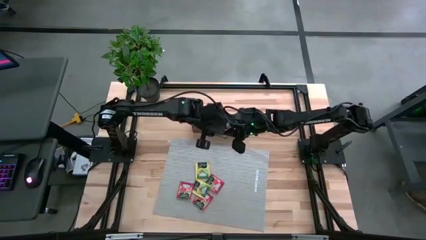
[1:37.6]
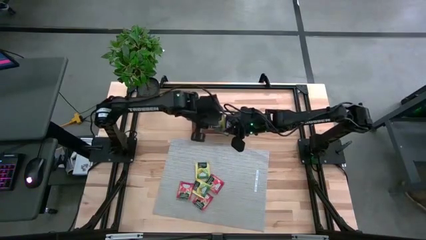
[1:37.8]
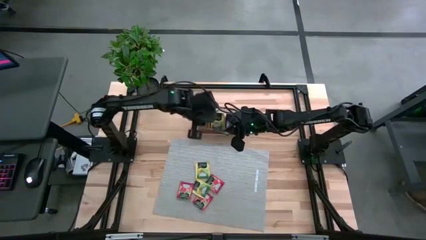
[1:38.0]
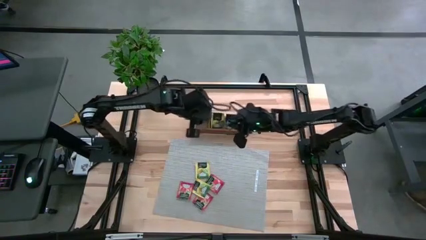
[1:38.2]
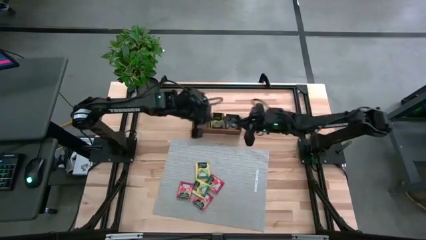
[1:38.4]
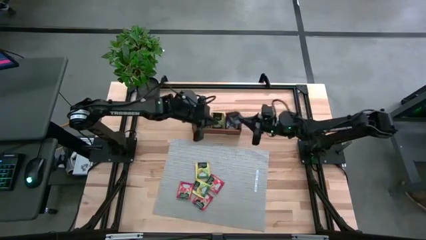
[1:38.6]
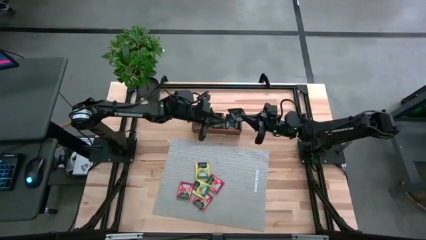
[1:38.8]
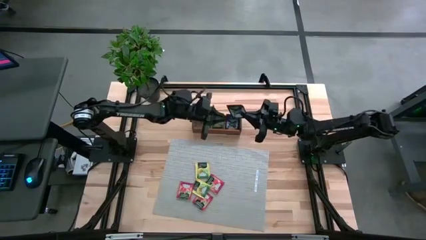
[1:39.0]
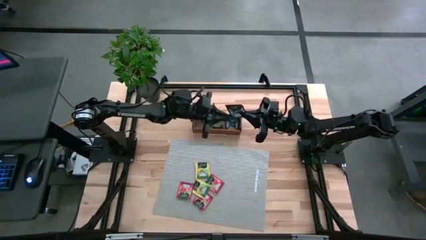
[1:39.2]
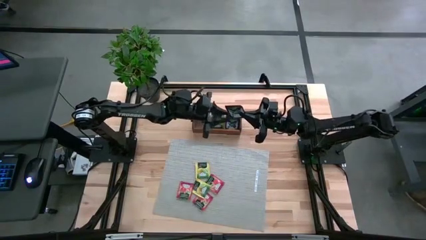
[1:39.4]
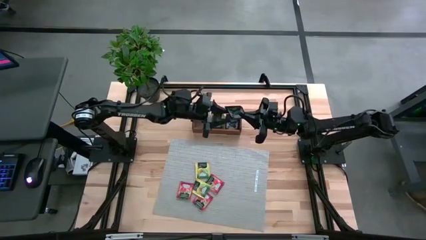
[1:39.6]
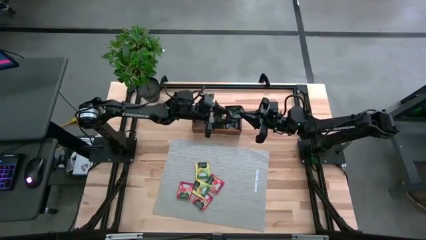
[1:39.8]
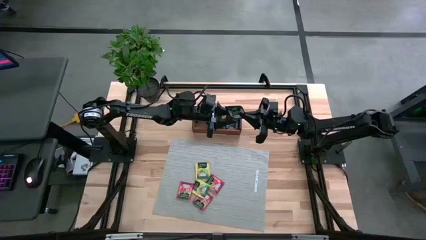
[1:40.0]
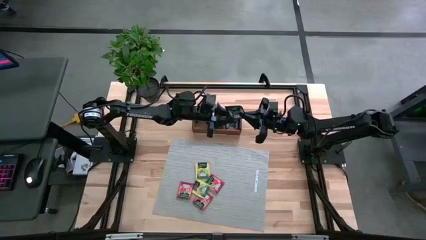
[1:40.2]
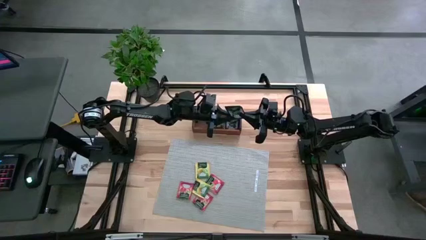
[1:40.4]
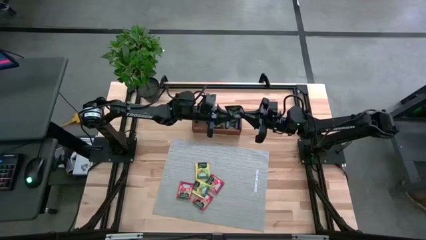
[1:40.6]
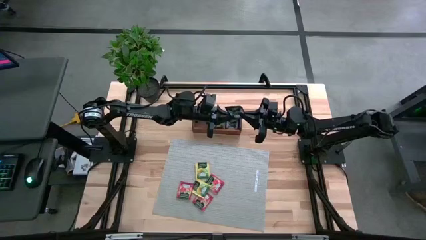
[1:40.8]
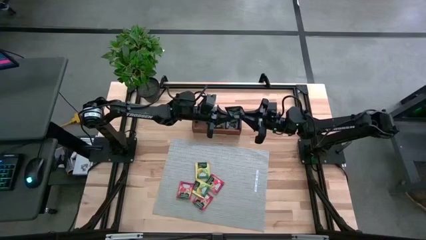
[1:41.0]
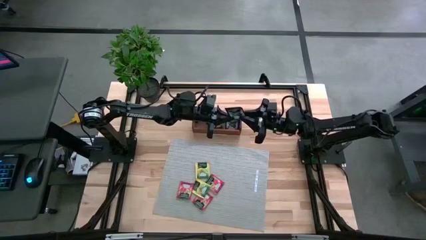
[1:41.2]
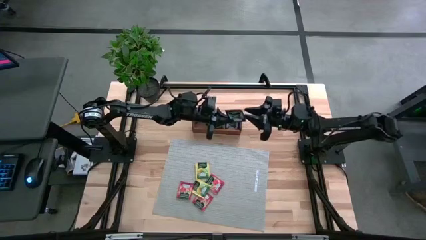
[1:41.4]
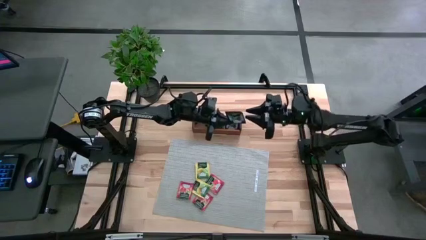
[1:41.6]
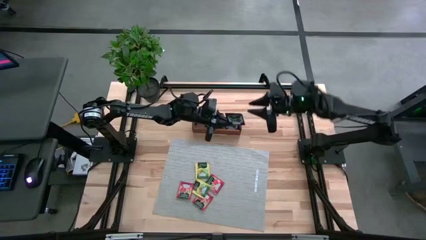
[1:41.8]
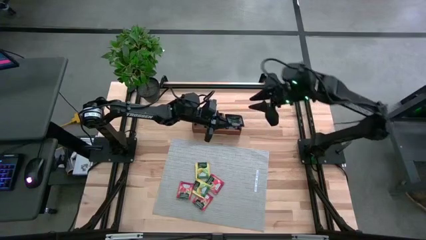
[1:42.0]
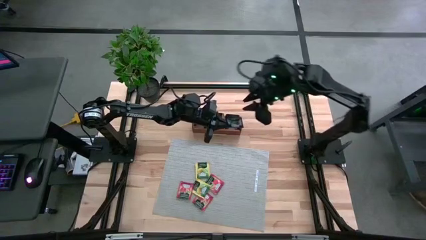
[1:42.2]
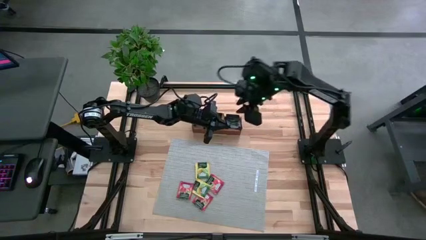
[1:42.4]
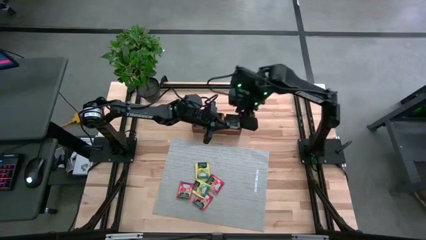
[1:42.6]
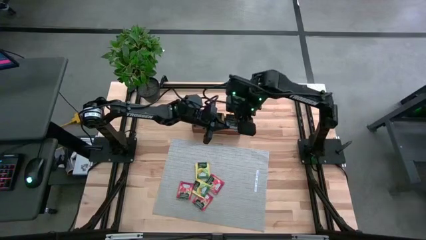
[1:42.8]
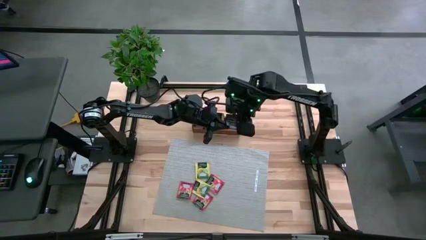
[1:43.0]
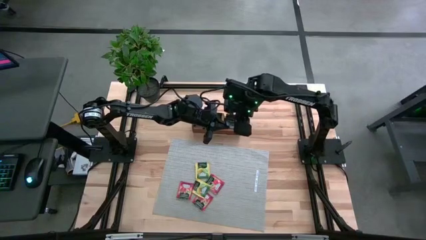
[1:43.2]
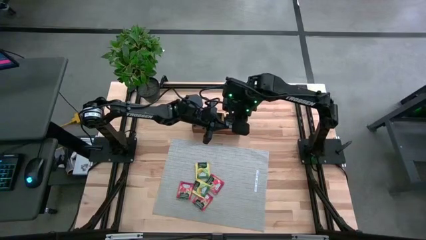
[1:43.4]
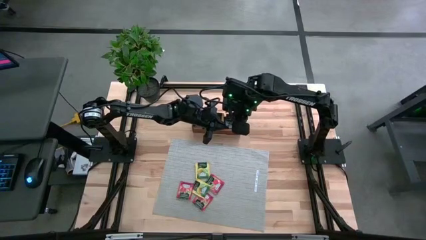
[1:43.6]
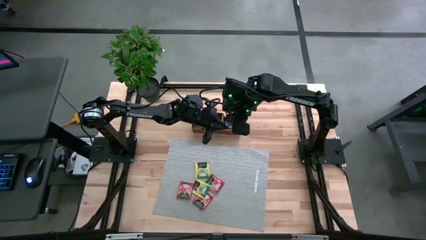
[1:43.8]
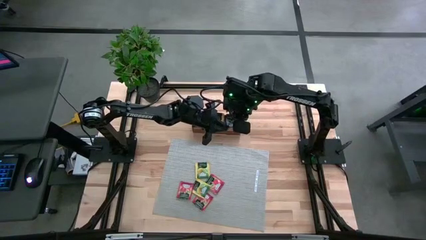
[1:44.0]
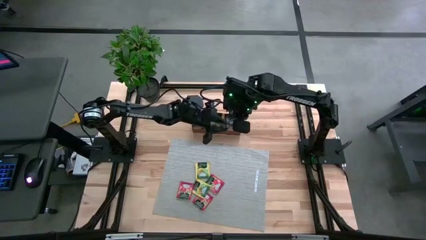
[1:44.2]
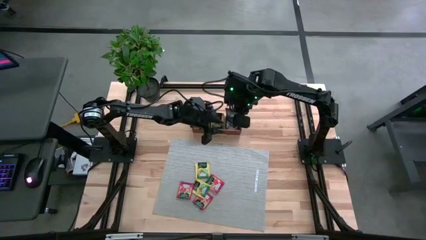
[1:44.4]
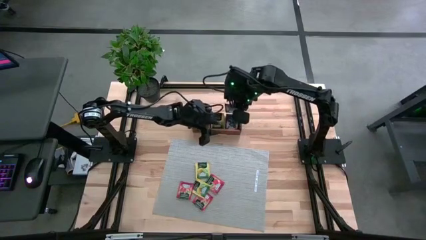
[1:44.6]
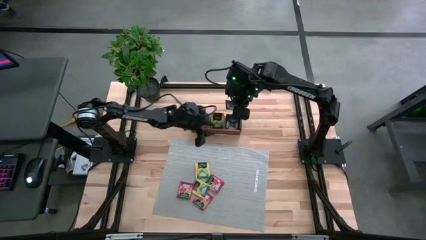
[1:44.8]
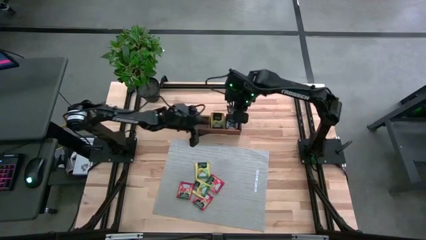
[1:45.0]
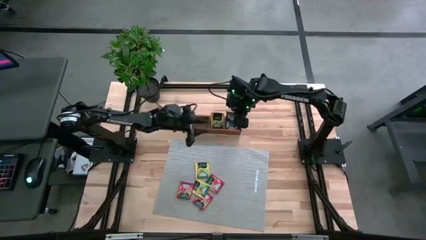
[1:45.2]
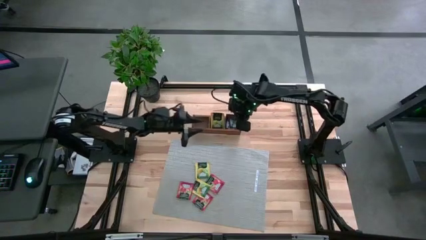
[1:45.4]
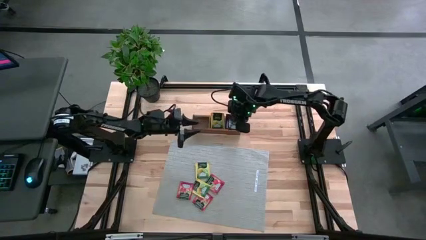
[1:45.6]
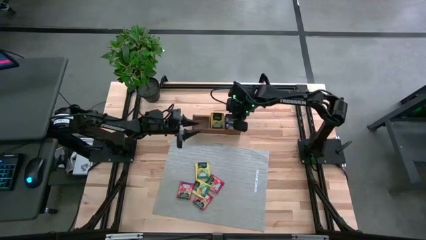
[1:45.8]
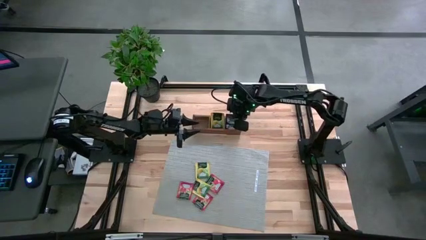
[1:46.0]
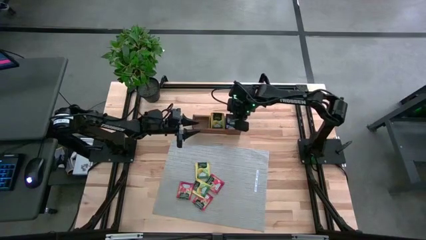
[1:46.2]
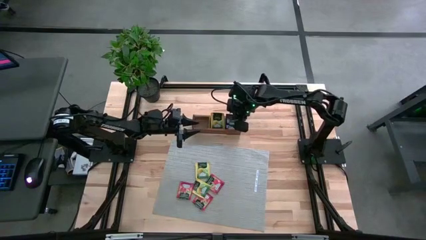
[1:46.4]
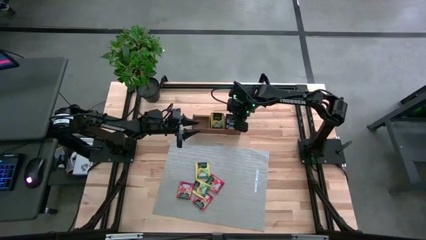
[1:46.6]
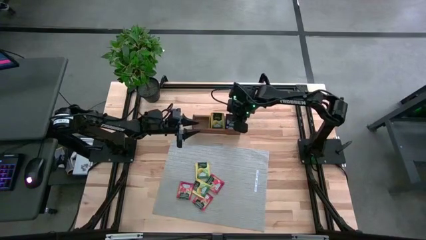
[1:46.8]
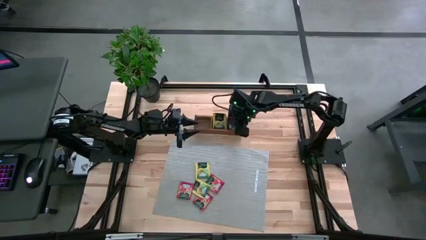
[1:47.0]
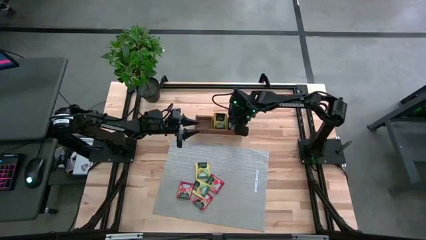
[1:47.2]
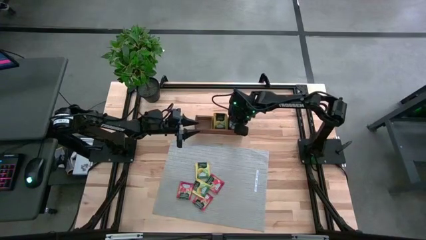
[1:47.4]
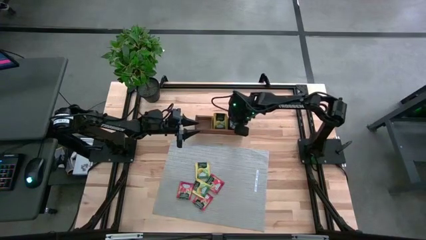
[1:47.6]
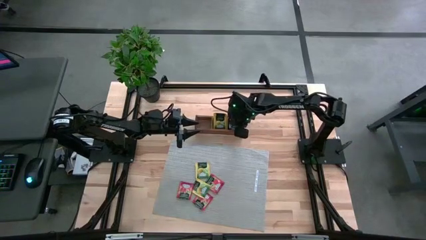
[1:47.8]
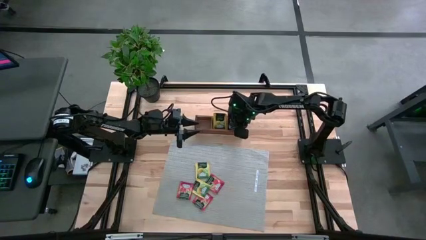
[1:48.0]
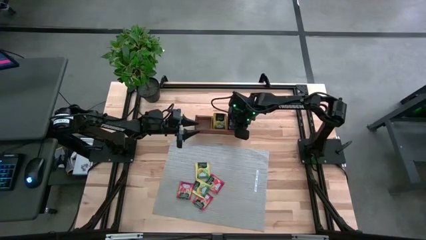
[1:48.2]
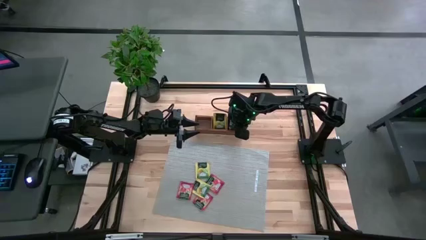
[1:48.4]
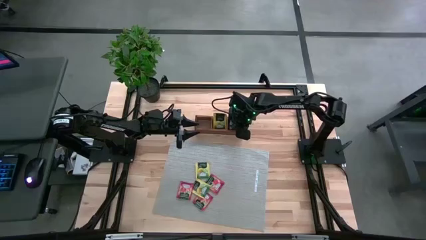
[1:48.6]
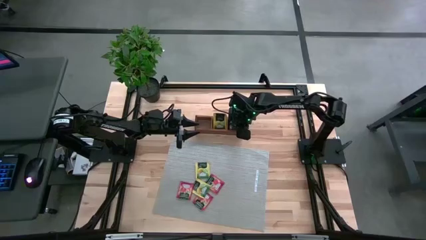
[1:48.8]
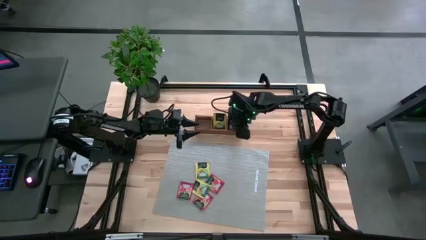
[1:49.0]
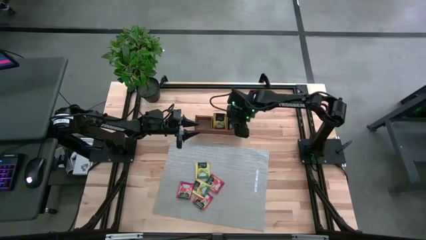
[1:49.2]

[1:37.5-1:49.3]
Task: Pick & Place Tea
Put the violet tea bag into the right section of the wooden organizer
